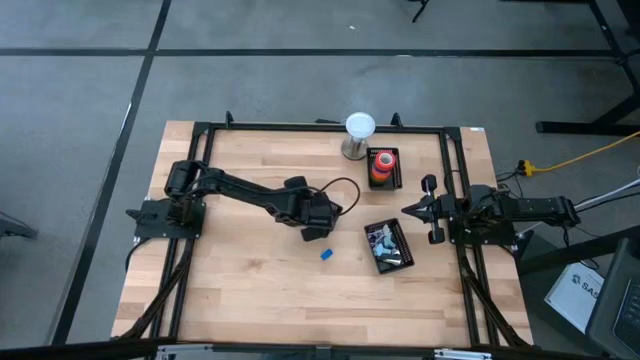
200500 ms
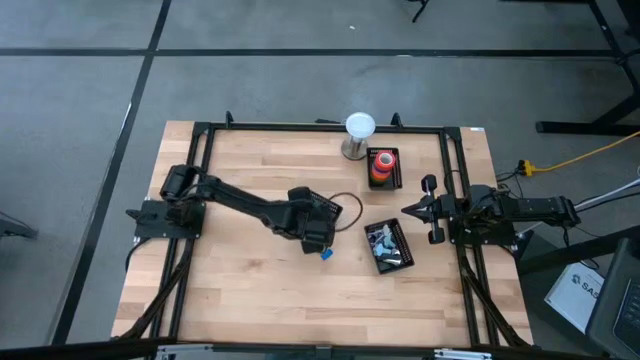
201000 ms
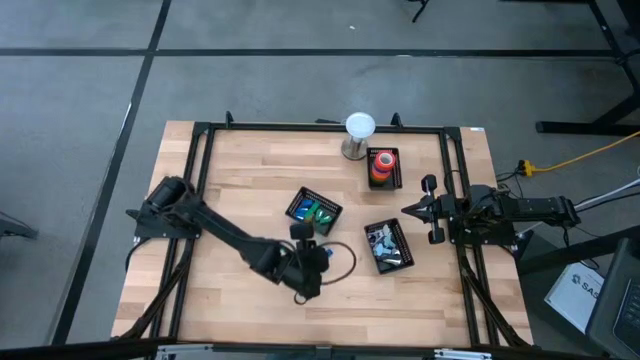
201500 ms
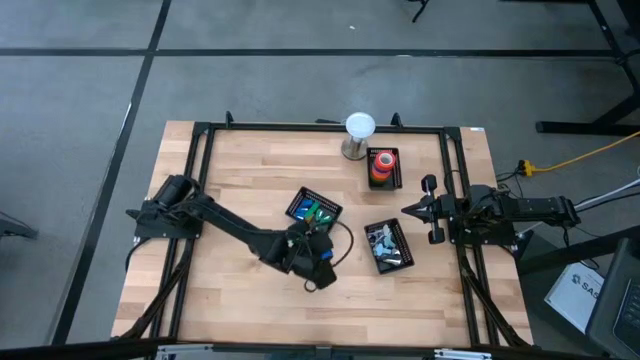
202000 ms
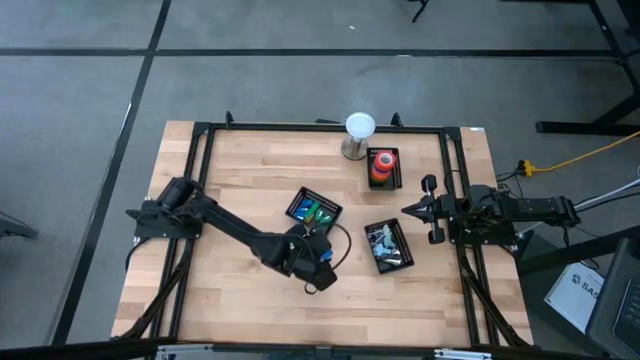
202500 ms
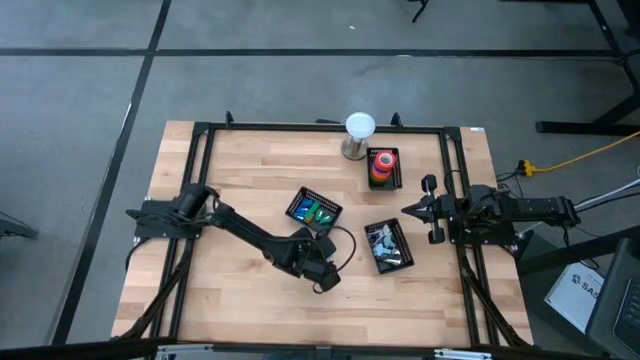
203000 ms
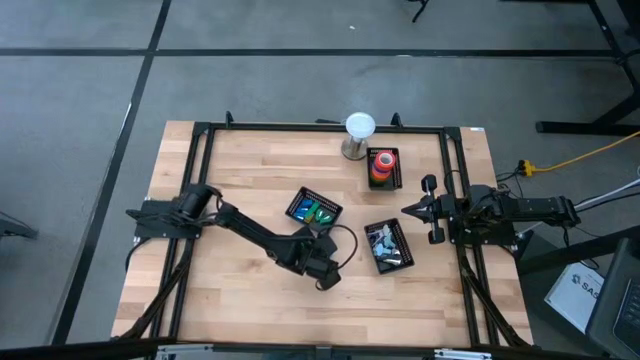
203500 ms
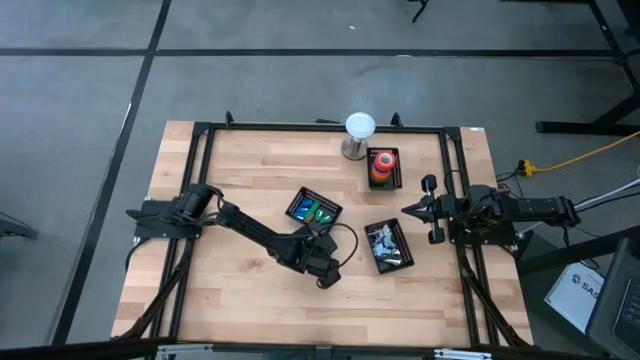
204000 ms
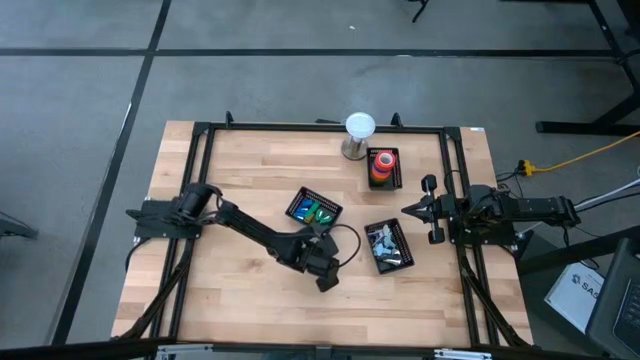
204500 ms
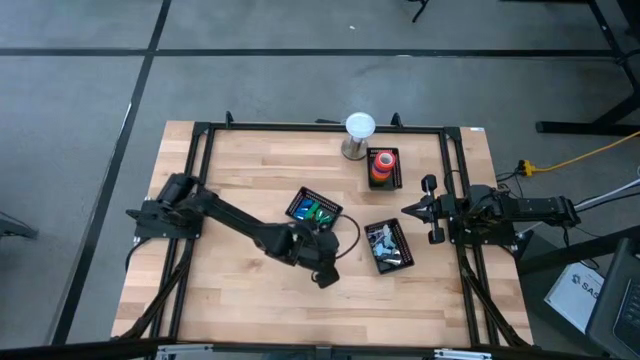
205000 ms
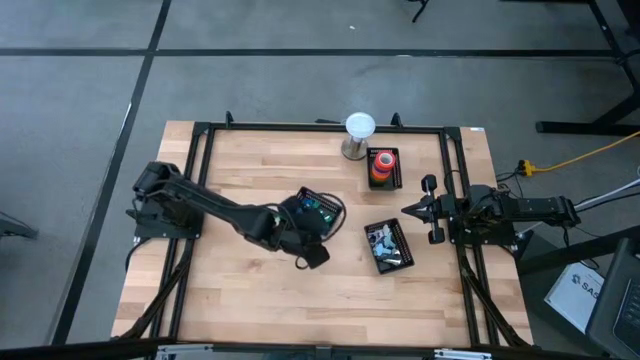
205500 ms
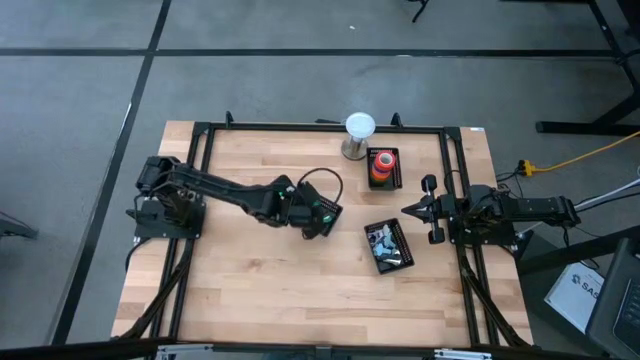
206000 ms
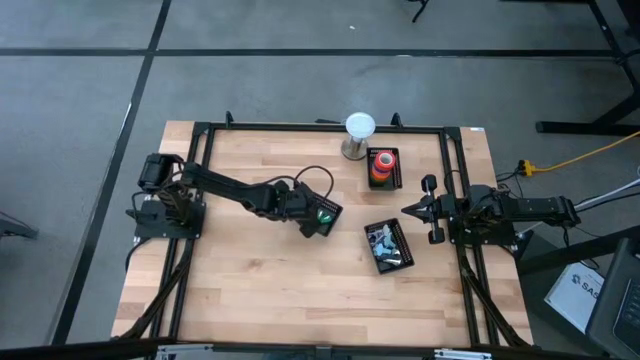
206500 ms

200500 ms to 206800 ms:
Task: Pick and place Stapler, Stapler remover, tape
Put the blue stapler into the center black bin

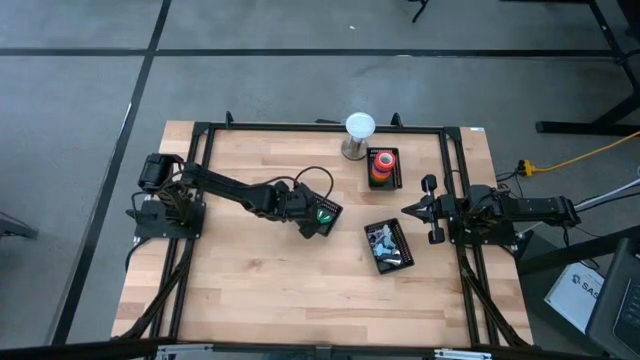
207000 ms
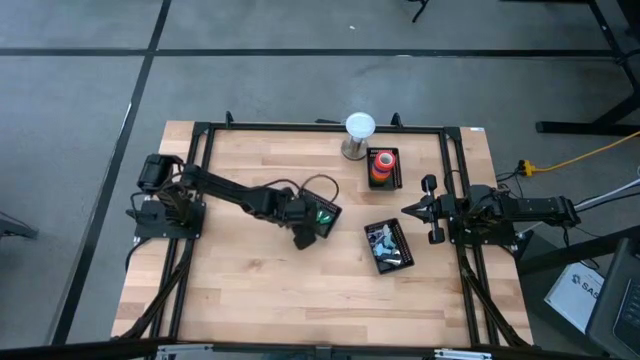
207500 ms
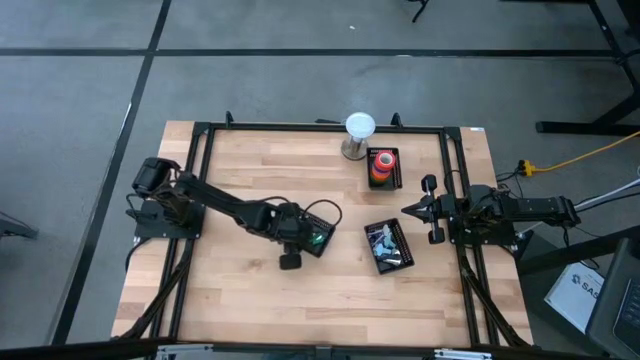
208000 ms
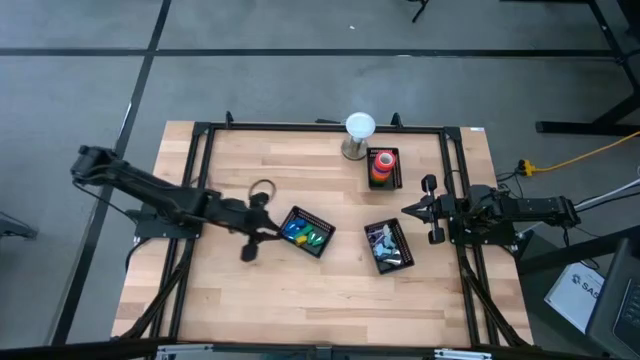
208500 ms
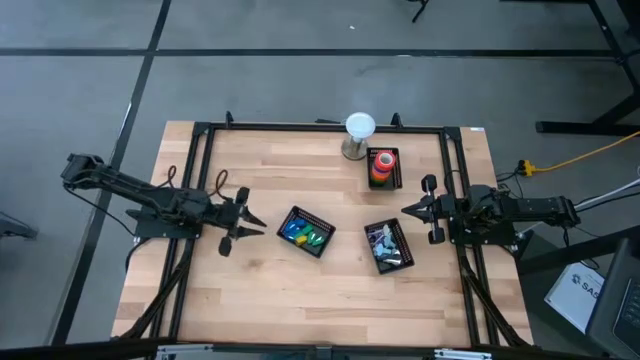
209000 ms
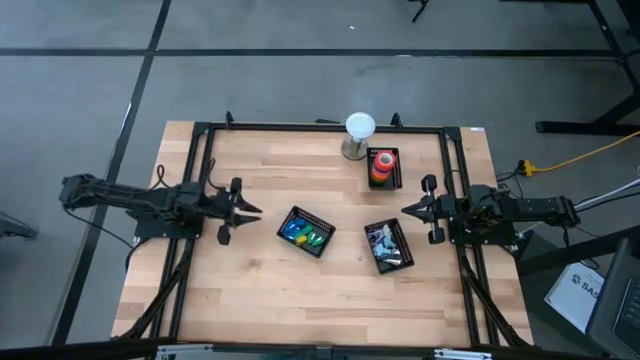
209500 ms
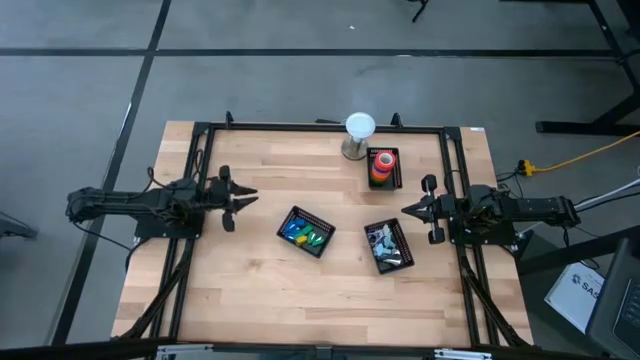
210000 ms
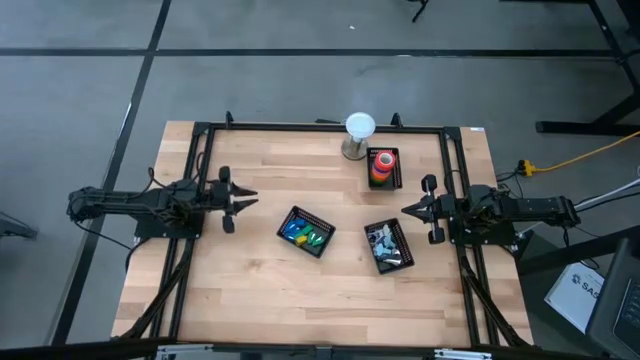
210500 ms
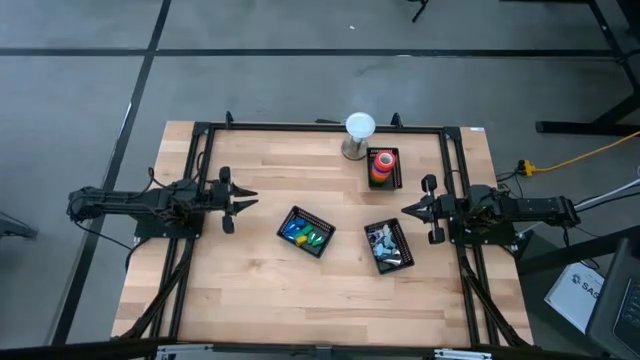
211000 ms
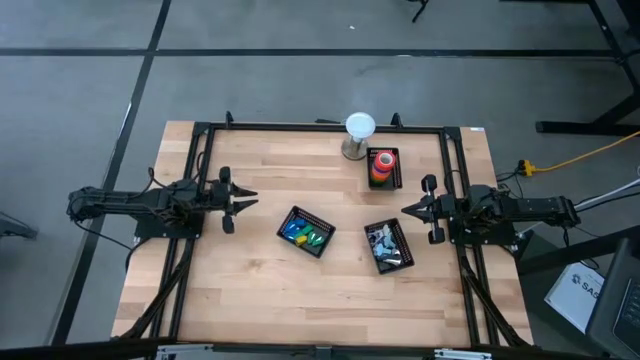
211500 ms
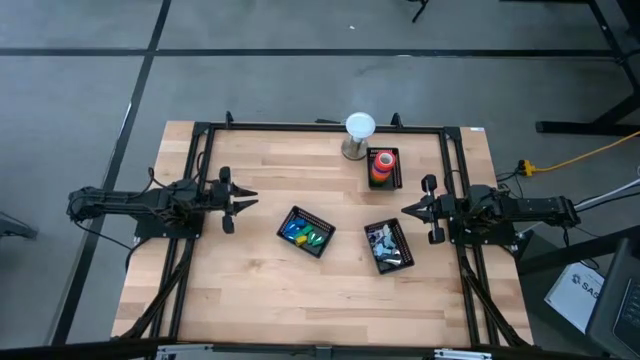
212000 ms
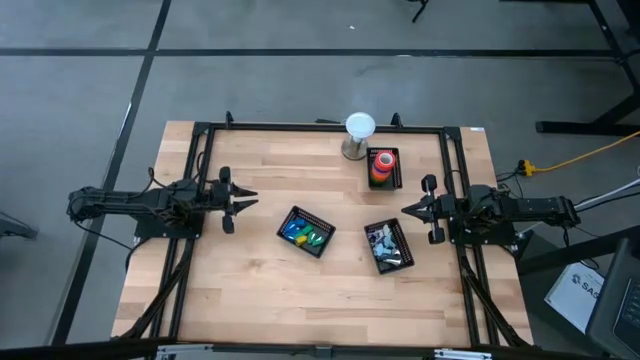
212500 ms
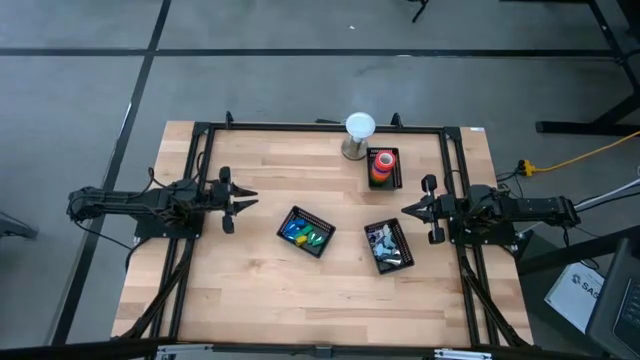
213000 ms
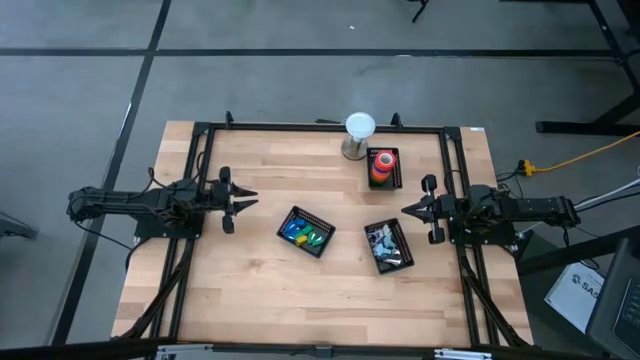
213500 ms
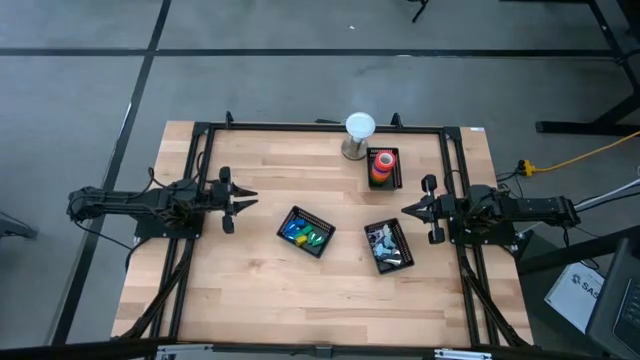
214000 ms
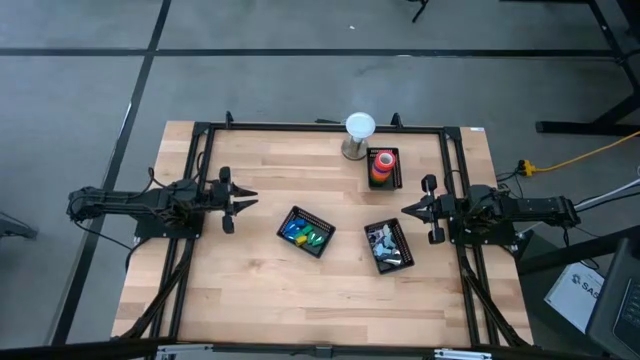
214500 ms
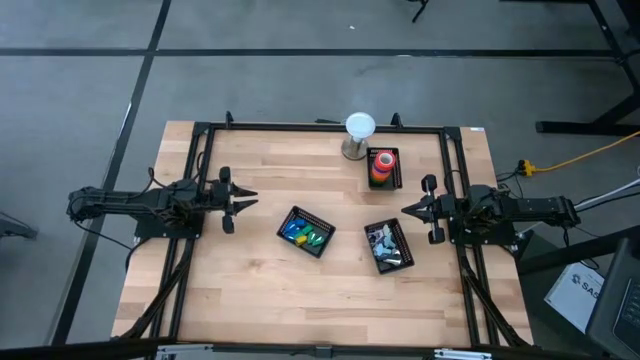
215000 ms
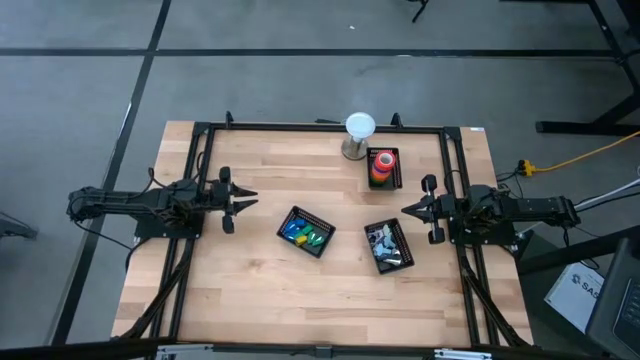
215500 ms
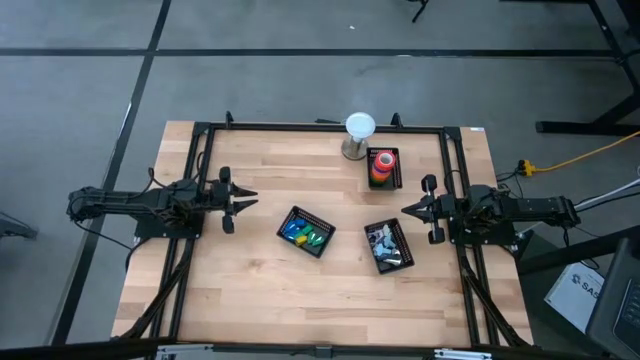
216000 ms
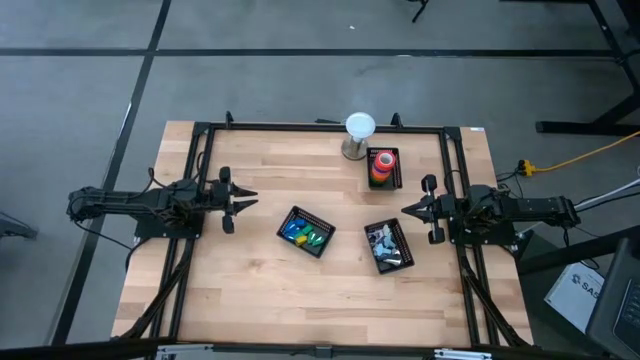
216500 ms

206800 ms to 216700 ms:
Return to Home Position

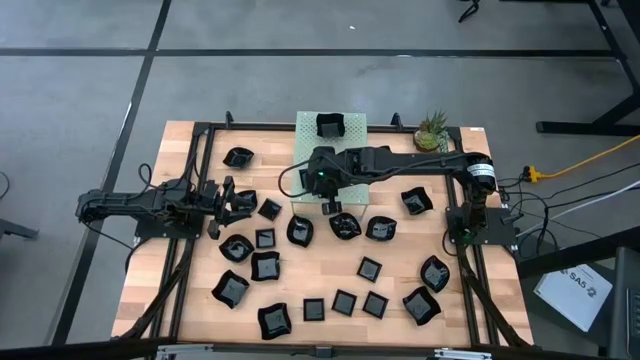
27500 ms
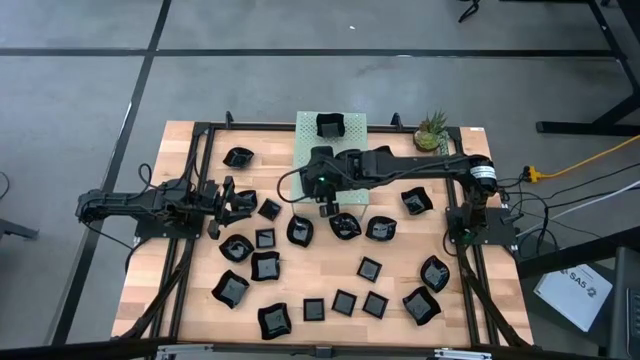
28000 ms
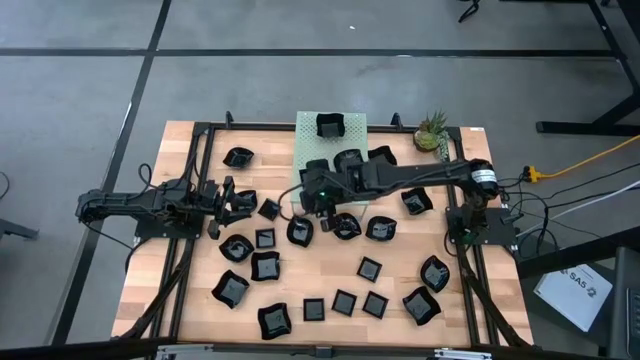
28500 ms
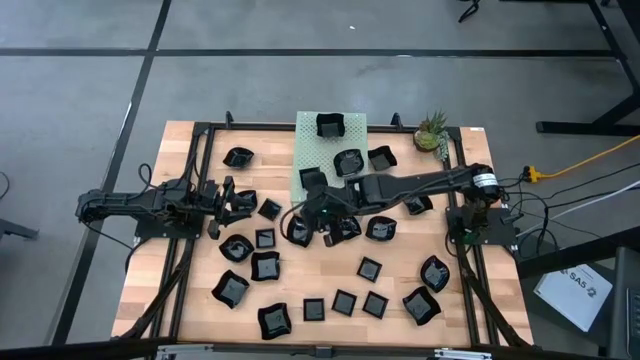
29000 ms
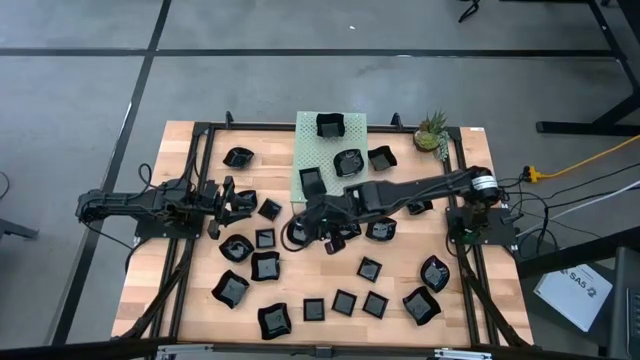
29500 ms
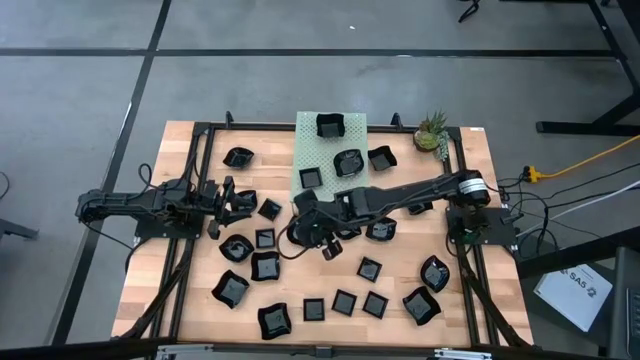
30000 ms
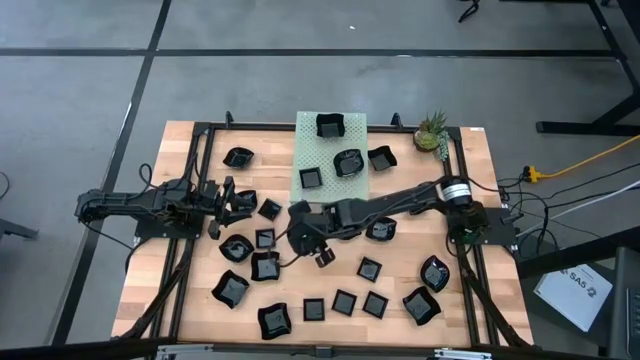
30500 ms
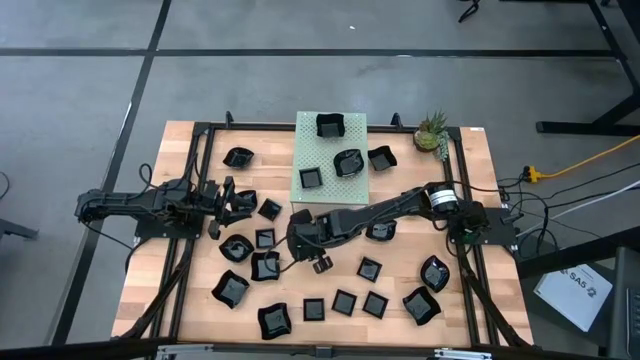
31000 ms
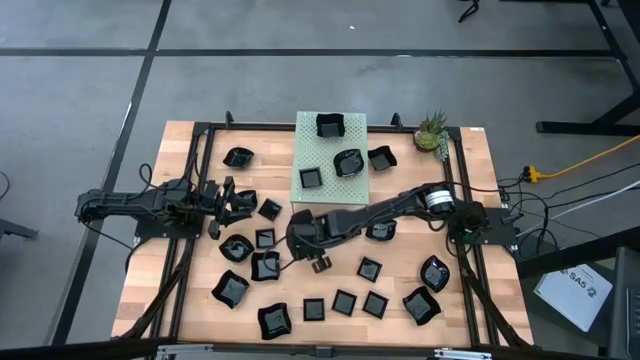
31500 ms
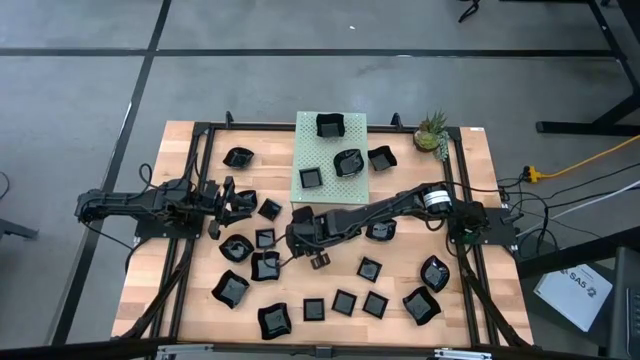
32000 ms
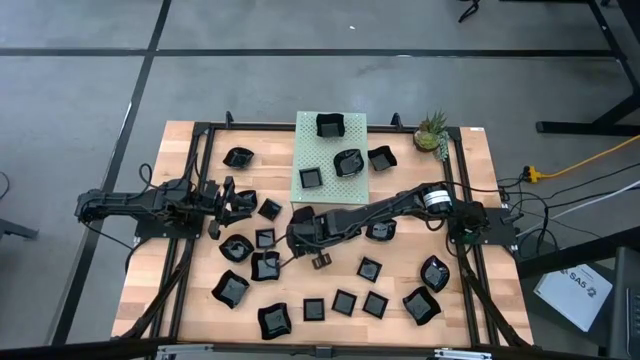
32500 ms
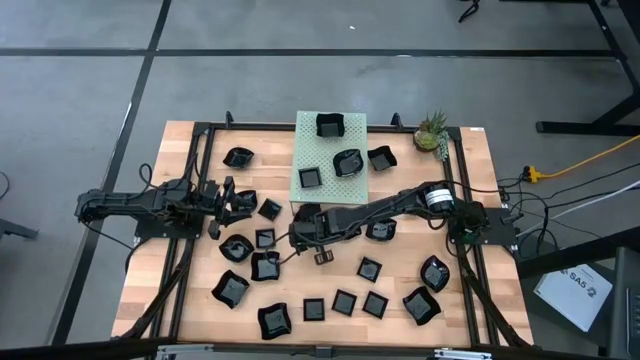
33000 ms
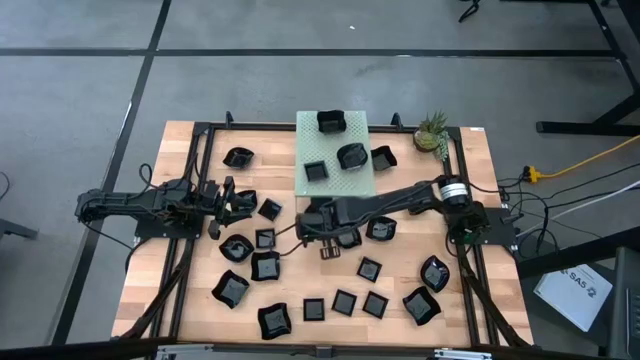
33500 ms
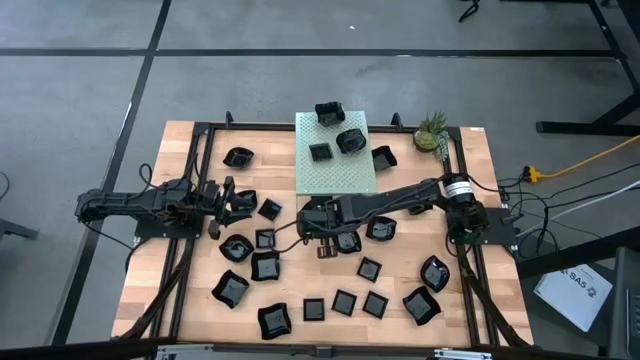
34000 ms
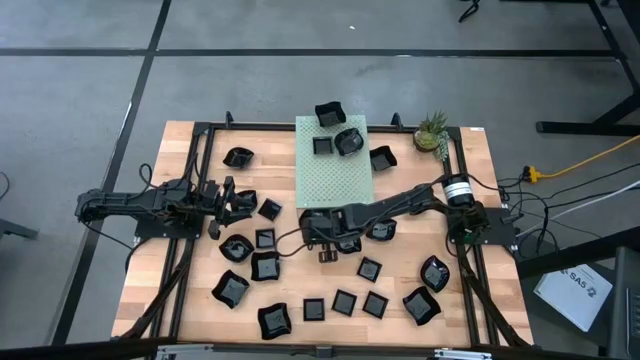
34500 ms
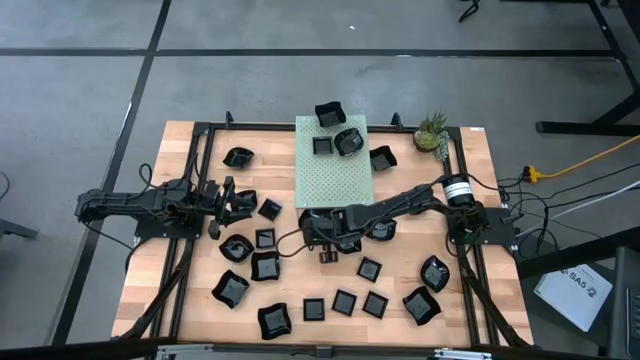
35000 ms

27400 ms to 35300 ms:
Task: Pick & Place Mini shaped plates
Stack the black leaf shaped plate on top of the black leaf shaped plate on the shelf
